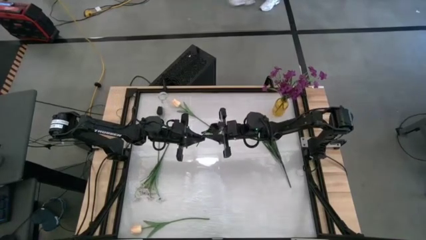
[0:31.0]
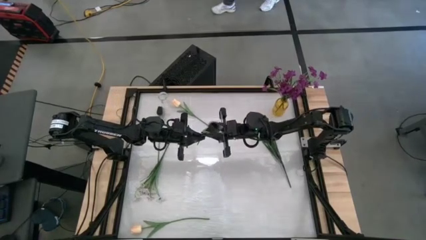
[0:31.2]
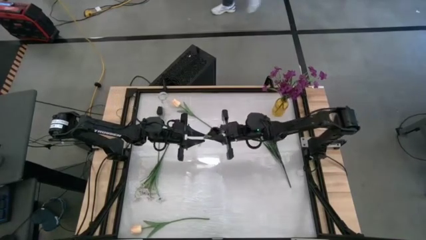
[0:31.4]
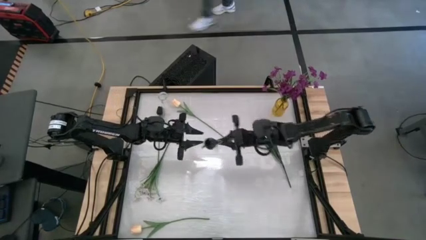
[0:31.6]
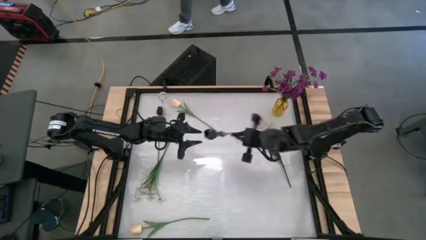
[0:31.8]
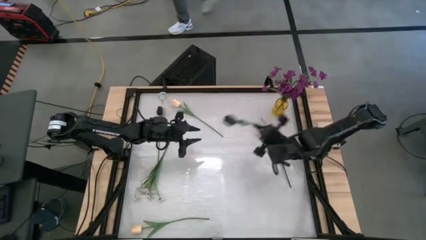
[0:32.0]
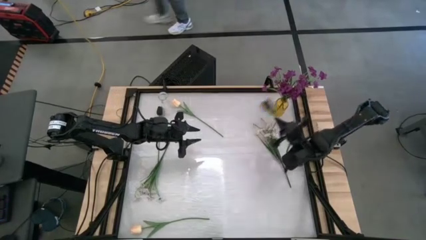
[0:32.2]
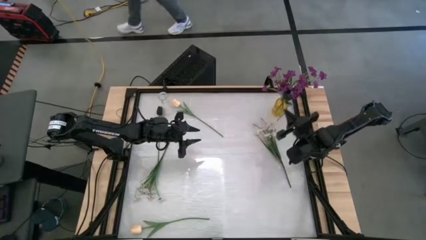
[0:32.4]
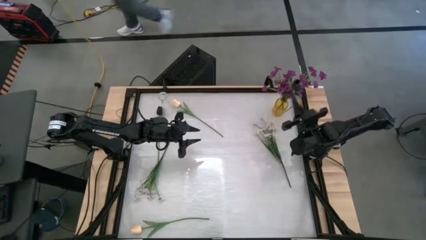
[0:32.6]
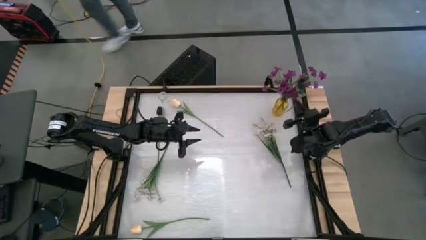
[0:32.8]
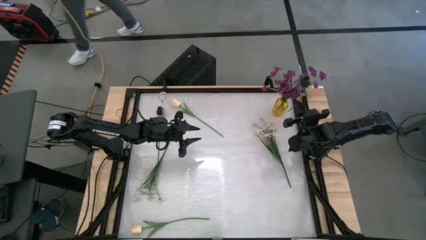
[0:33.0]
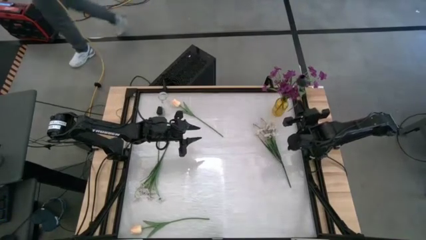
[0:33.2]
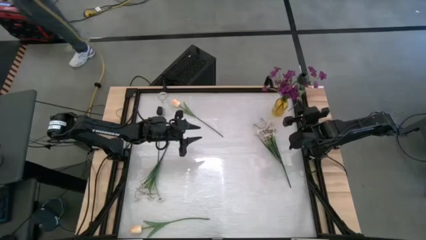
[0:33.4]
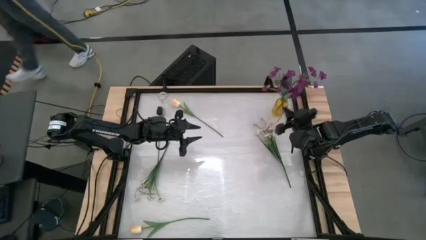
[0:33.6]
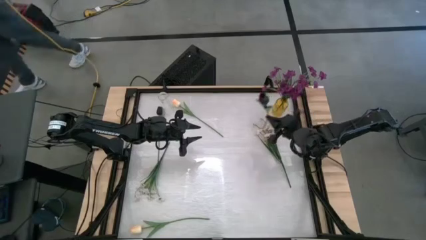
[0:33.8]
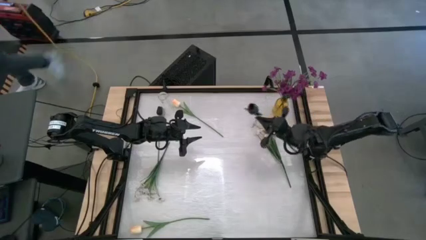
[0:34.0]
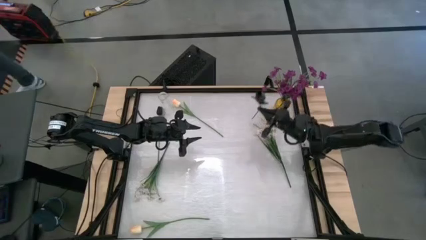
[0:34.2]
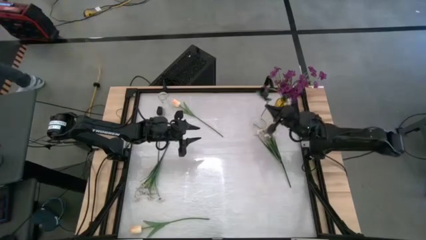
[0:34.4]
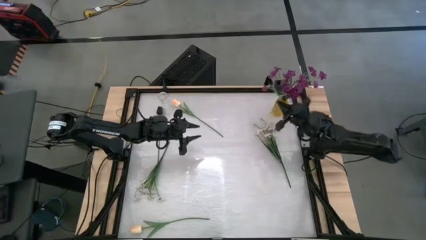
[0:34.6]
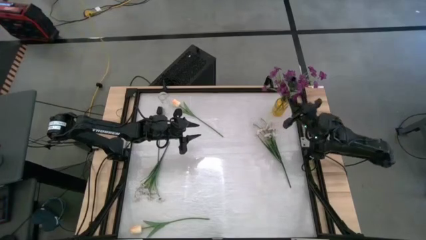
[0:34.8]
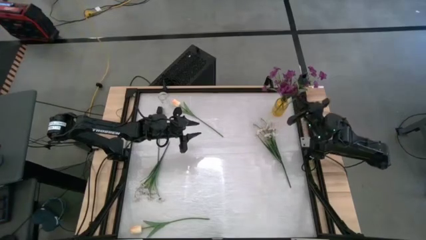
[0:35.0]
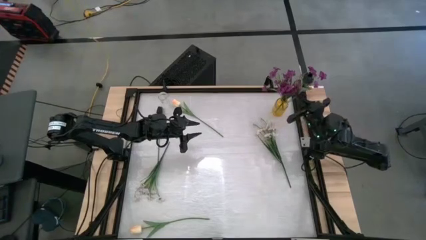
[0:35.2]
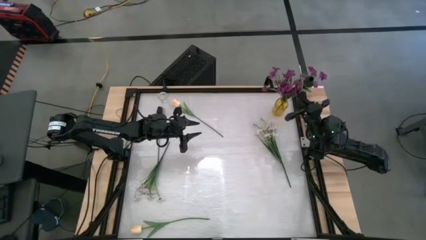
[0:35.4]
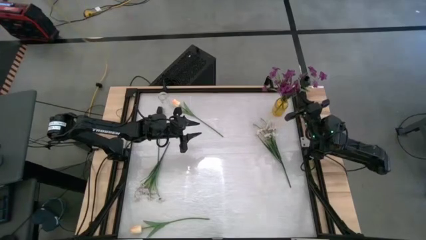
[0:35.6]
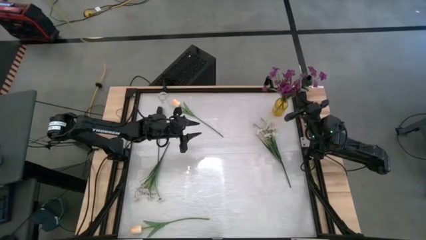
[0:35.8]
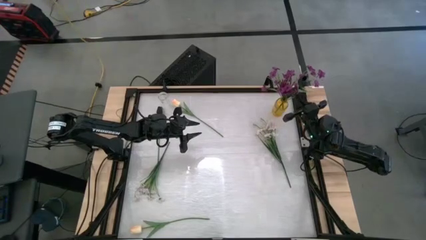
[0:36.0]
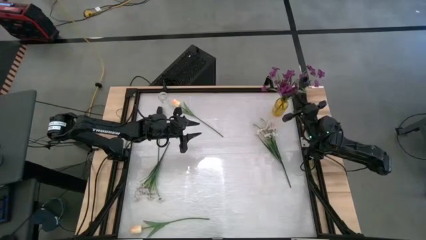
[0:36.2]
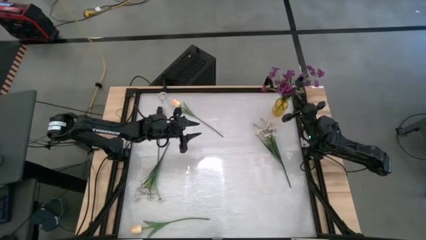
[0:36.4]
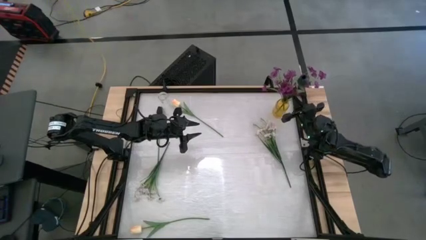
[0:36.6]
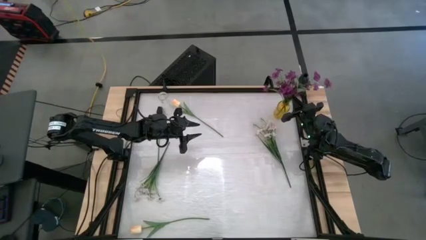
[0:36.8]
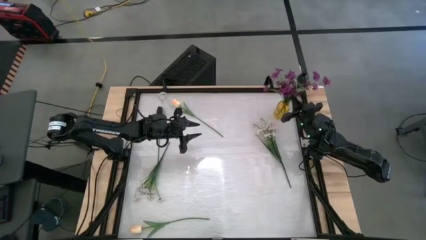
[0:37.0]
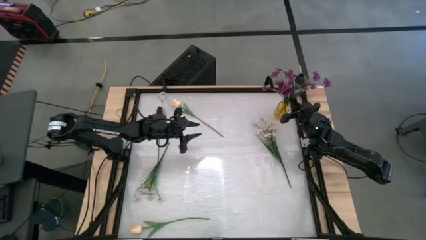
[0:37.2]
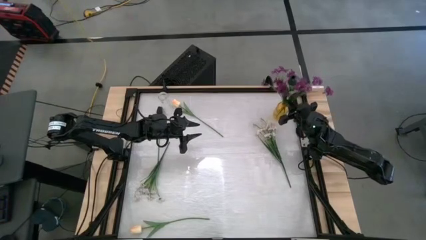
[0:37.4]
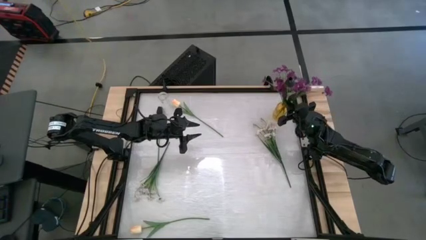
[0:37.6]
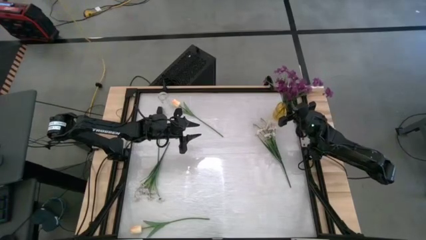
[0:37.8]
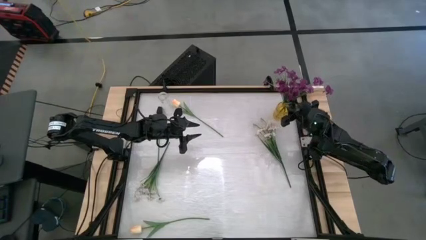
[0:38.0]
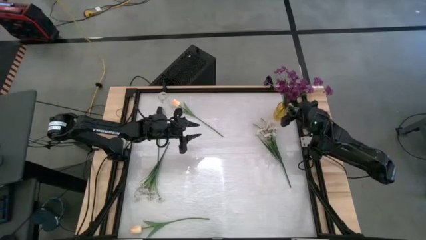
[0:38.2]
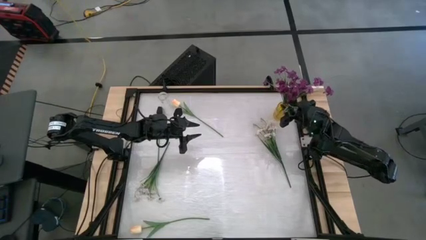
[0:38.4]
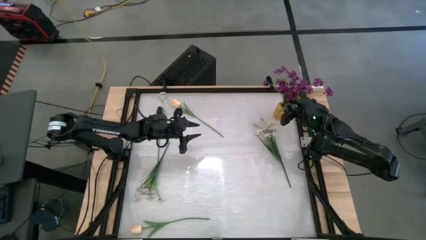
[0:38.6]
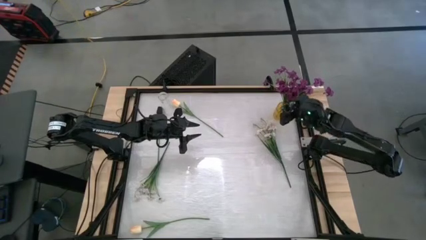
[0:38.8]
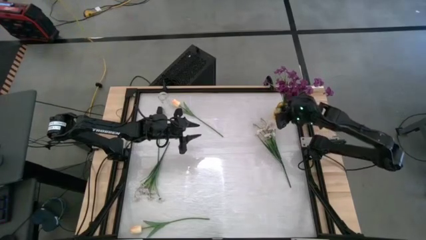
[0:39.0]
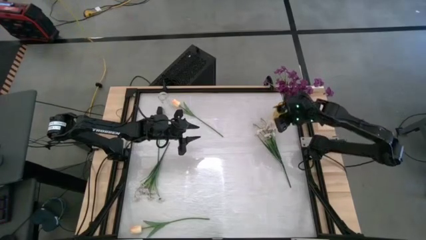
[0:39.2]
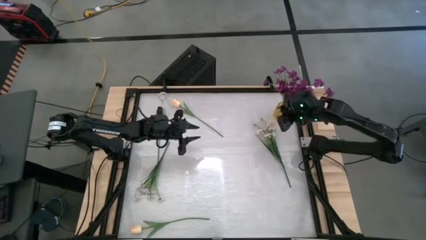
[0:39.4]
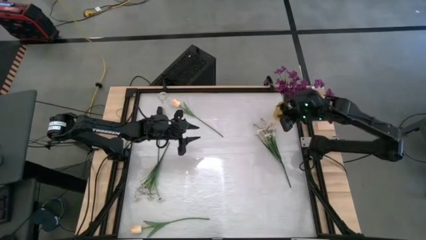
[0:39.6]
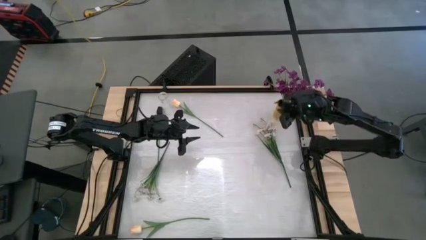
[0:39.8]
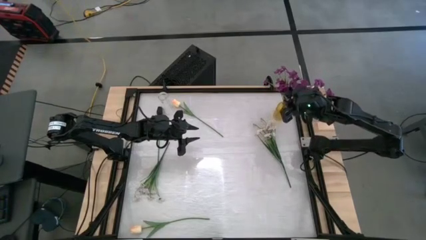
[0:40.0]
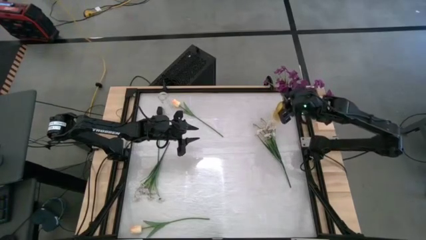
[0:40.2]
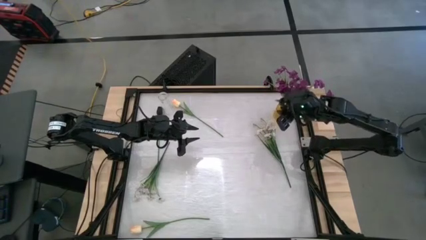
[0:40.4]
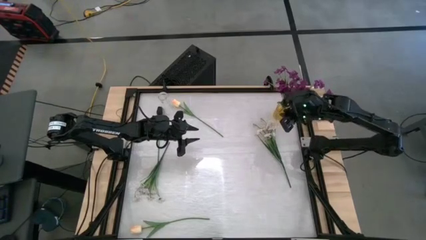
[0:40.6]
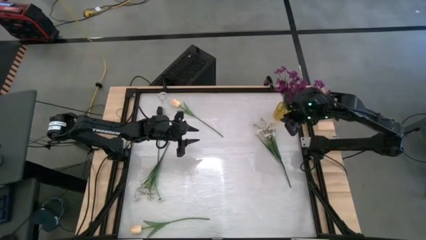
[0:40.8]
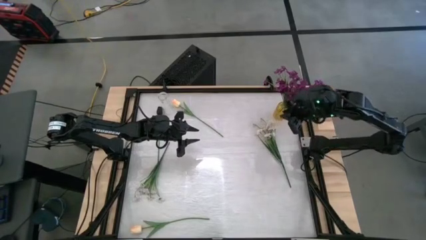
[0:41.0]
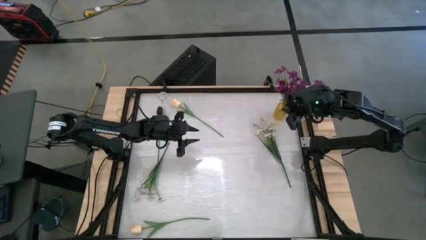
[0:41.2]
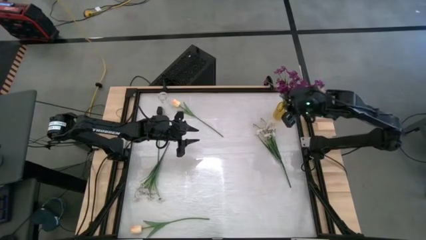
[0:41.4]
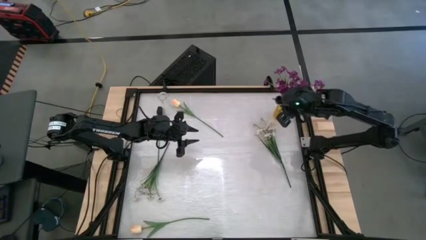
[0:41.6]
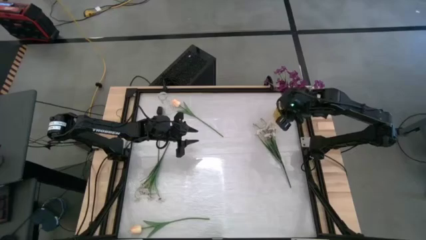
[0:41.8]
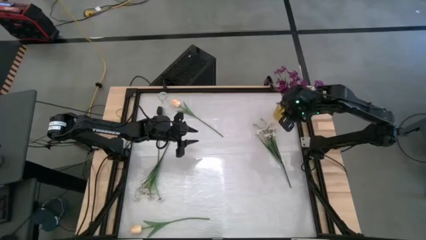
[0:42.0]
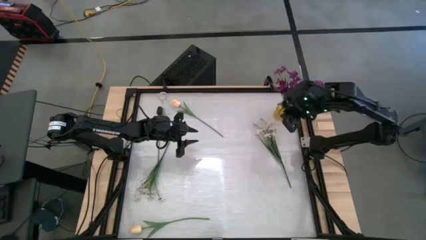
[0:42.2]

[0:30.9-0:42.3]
Task: Sort flowers into vase by color
Put the top black tulip into the yellow vase

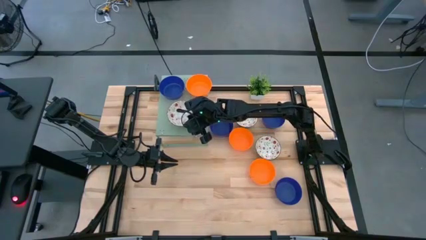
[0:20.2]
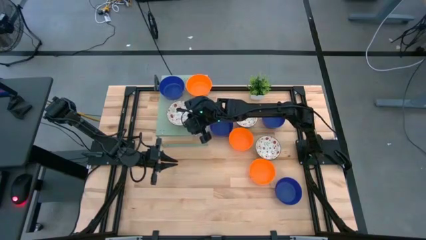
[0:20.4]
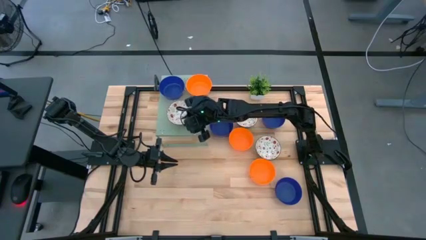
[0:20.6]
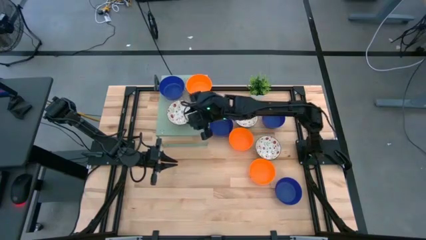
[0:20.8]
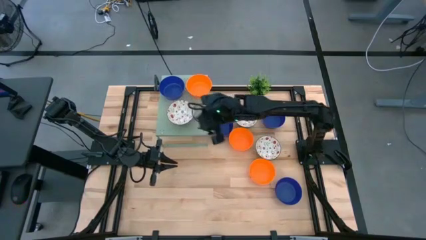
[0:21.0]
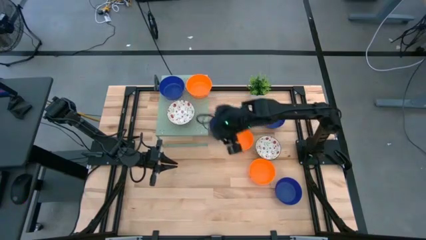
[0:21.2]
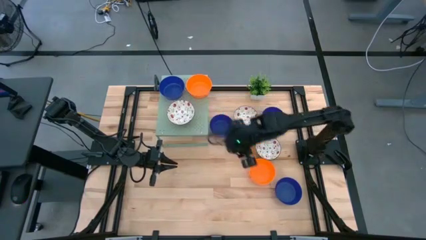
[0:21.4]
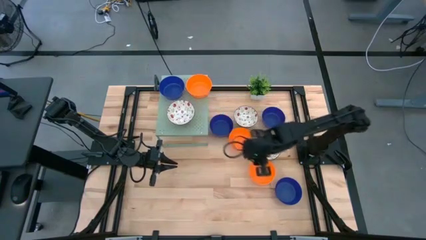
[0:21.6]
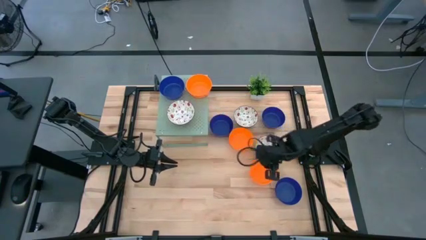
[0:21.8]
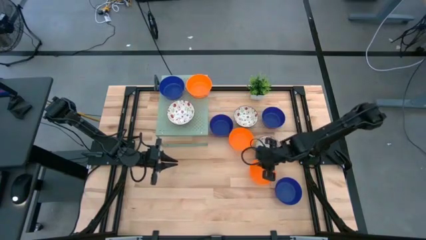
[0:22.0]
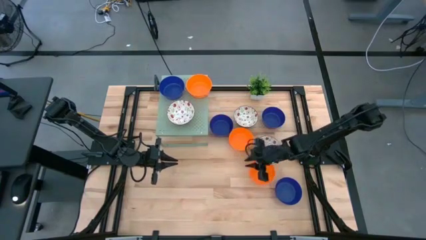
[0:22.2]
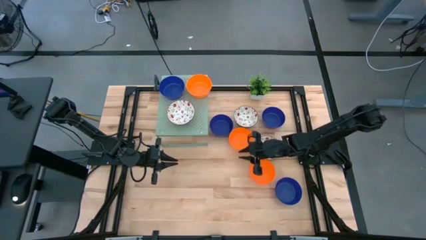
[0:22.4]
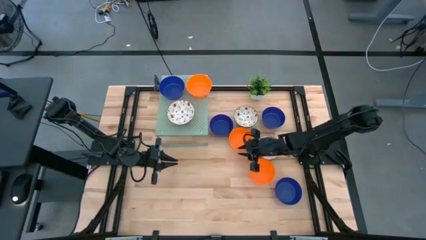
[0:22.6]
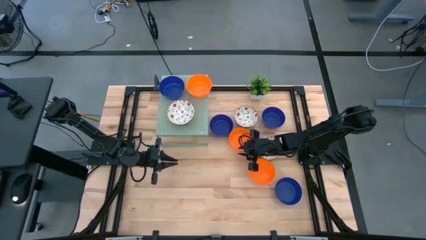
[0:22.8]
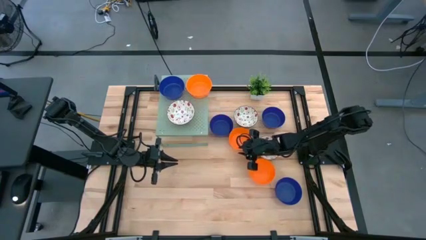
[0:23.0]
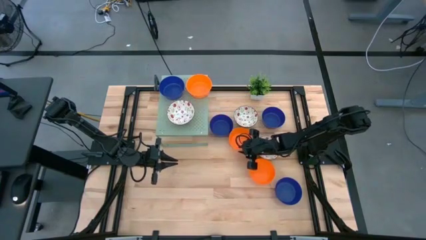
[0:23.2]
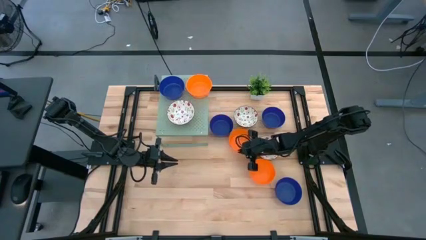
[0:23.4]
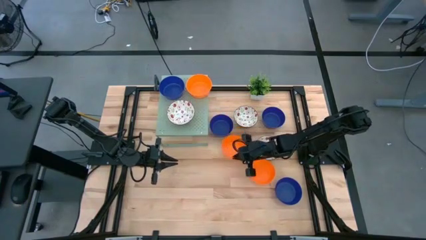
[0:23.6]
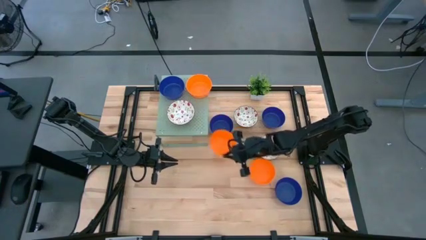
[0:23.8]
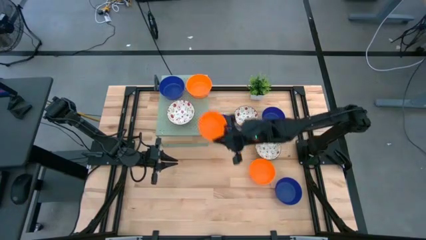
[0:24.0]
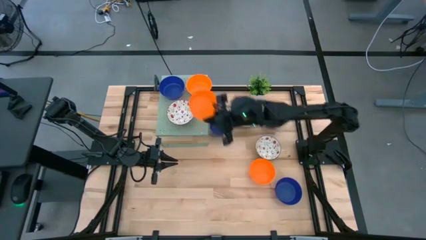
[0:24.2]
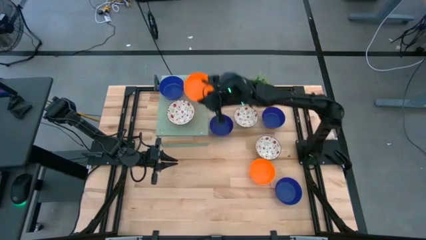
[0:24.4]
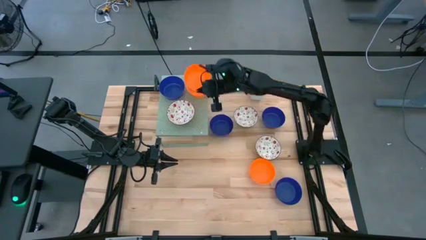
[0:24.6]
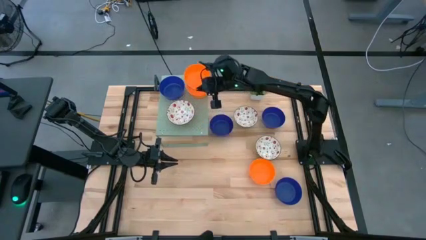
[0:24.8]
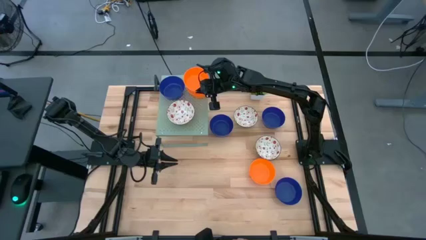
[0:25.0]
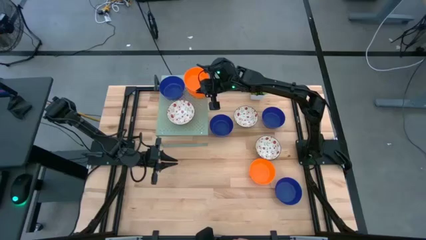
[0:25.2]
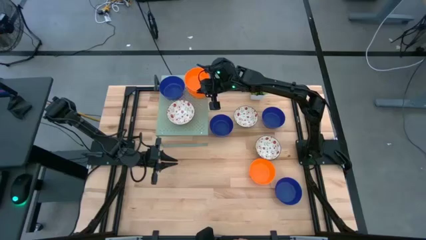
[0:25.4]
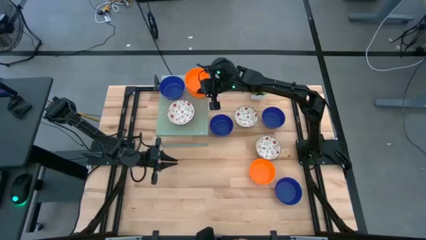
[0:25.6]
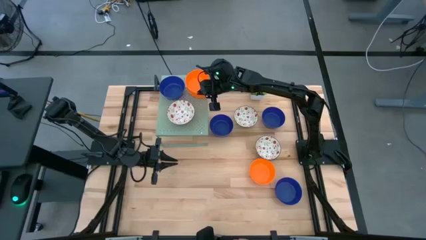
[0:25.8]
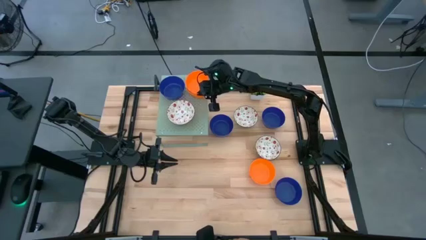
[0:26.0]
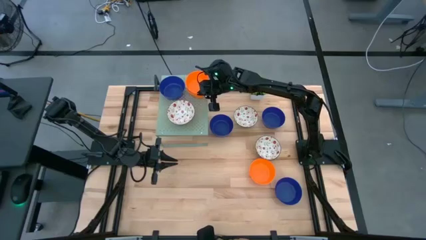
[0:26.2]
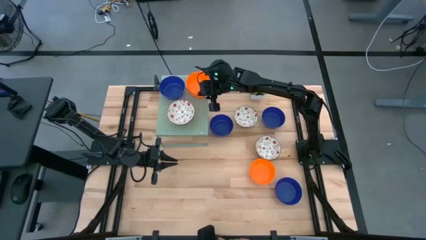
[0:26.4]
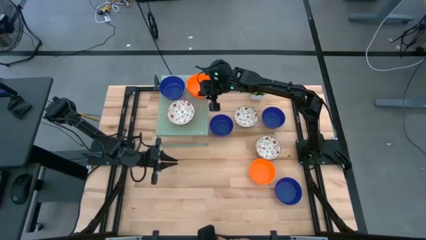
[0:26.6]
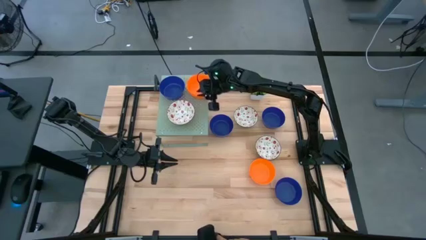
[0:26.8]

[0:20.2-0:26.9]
Task: Pick & Place Mini bowls
Stack the top left orange bowl on the other orange bowl on the shelf
